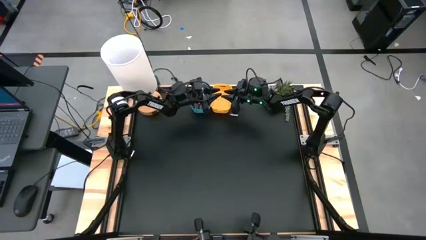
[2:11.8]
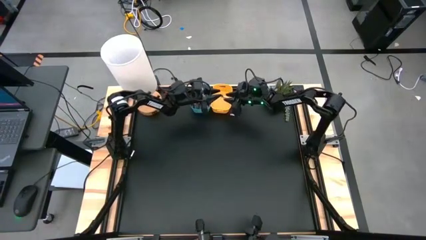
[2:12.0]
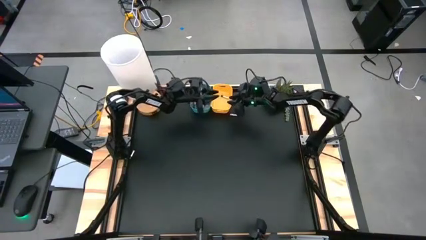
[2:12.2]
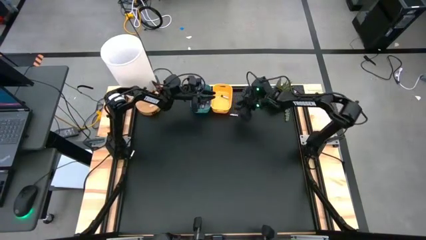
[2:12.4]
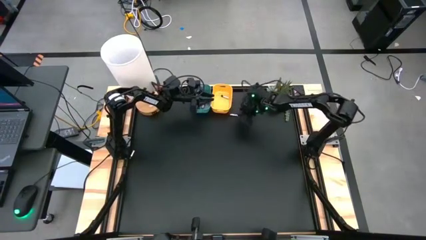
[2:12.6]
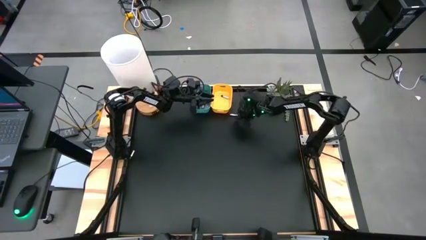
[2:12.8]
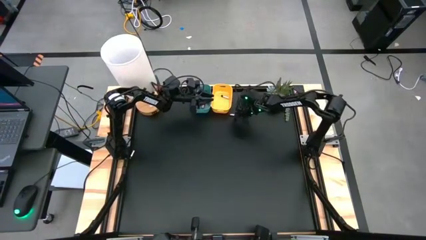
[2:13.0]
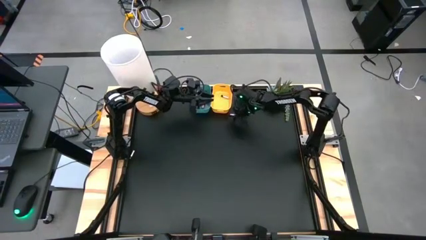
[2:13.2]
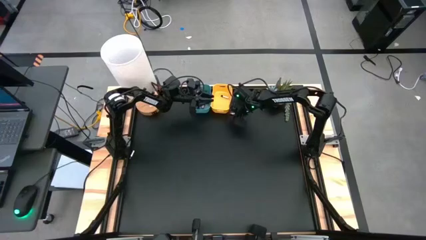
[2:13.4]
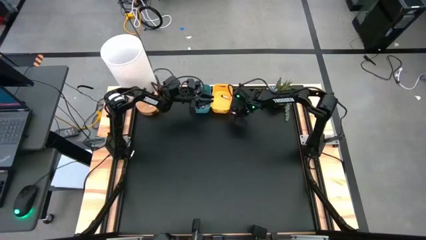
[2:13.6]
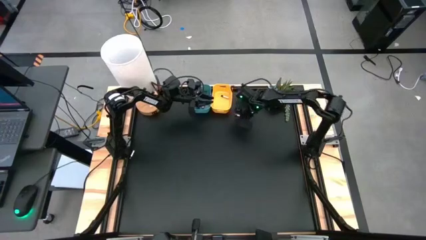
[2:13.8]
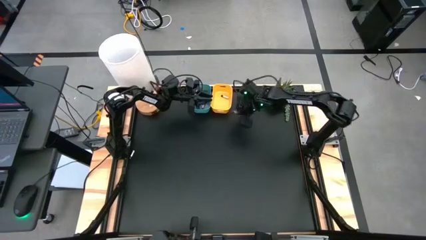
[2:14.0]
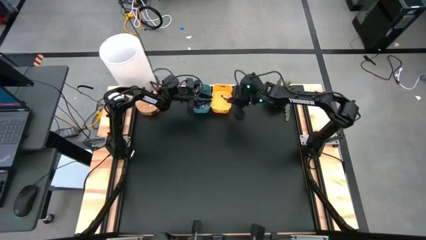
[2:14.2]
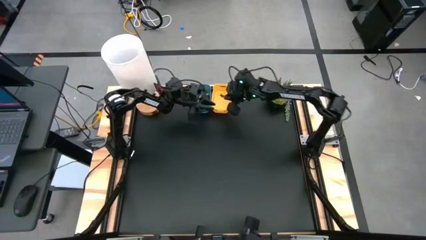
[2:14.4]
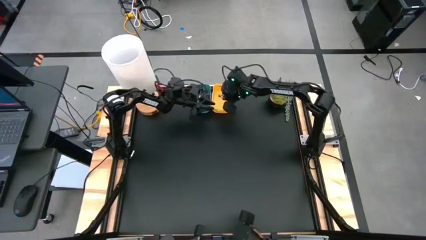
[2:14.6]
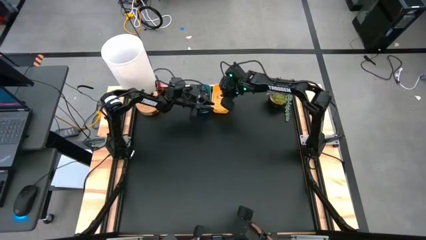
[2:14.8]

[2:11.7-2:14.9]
Task: Sort batteries
Put the silver black battery into the yellow bin

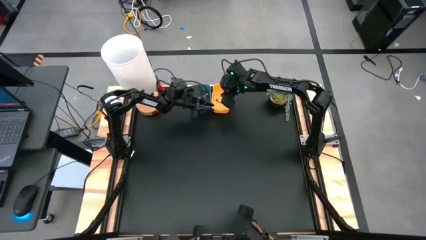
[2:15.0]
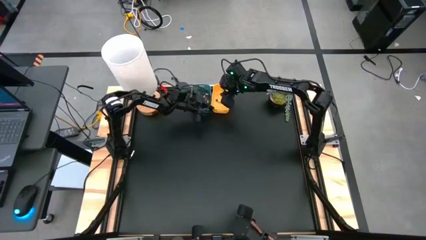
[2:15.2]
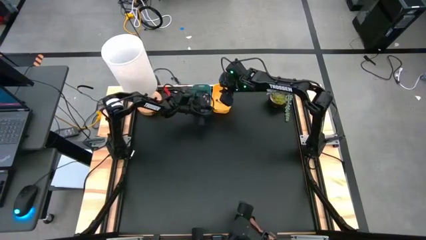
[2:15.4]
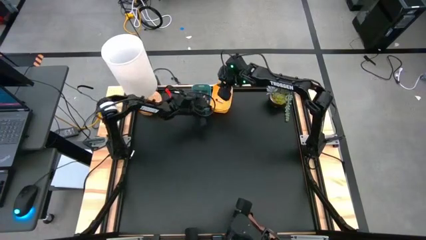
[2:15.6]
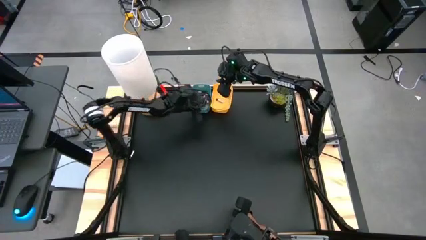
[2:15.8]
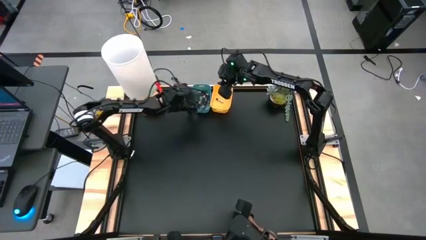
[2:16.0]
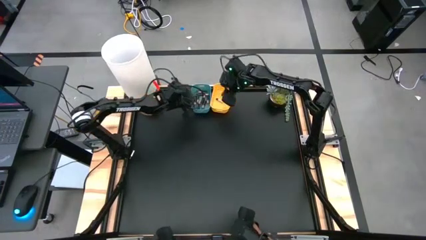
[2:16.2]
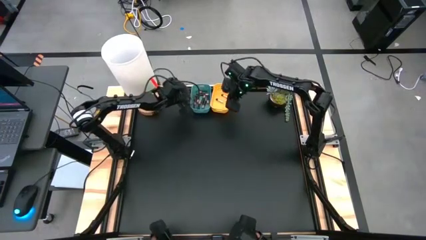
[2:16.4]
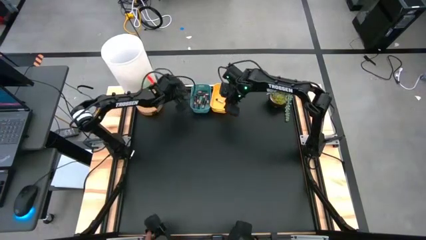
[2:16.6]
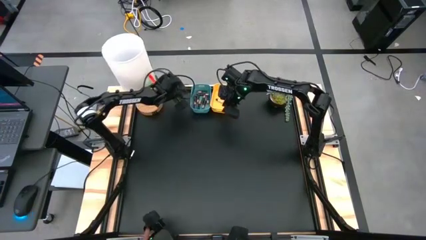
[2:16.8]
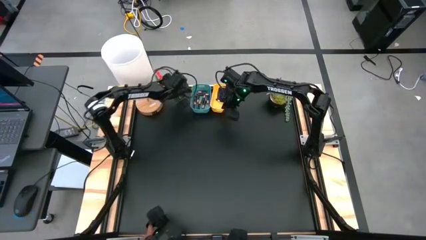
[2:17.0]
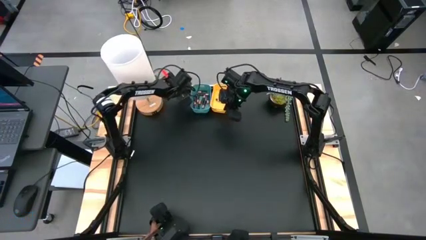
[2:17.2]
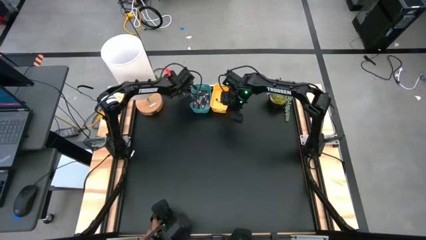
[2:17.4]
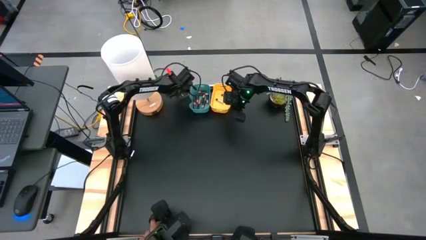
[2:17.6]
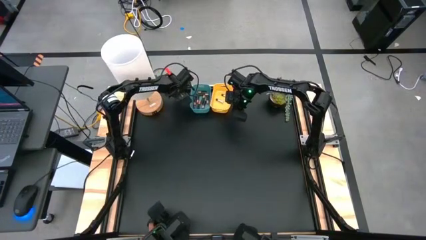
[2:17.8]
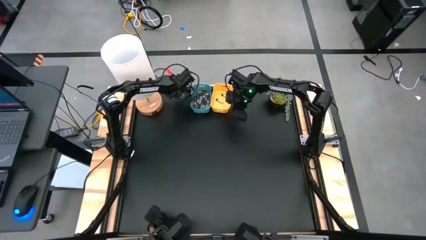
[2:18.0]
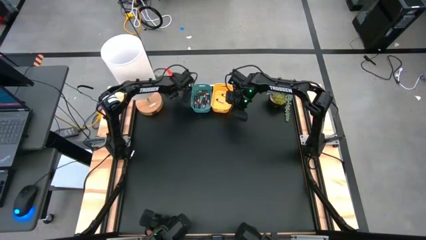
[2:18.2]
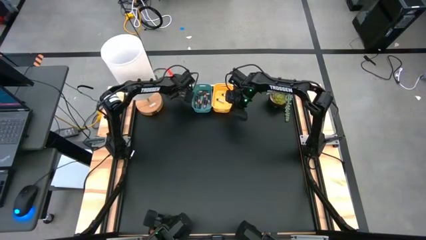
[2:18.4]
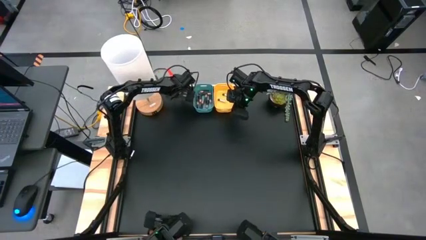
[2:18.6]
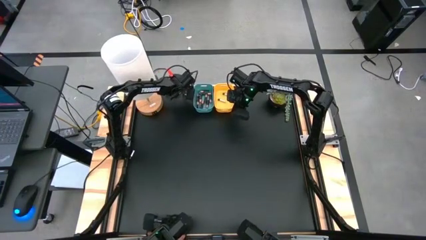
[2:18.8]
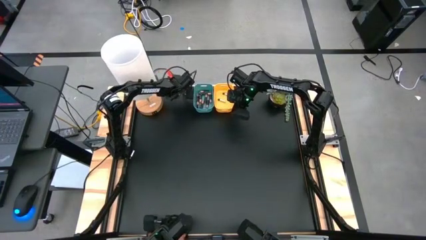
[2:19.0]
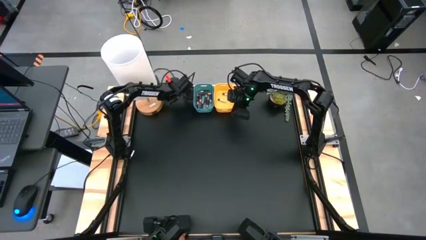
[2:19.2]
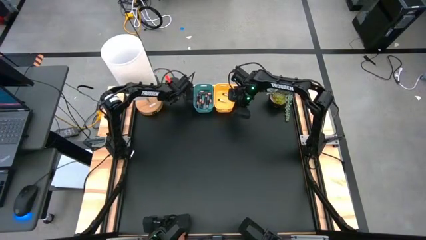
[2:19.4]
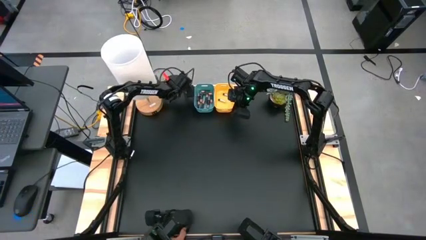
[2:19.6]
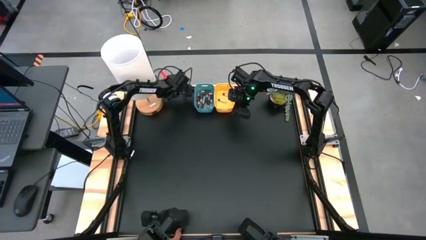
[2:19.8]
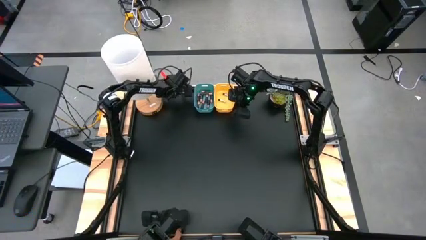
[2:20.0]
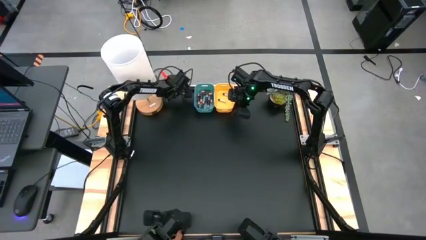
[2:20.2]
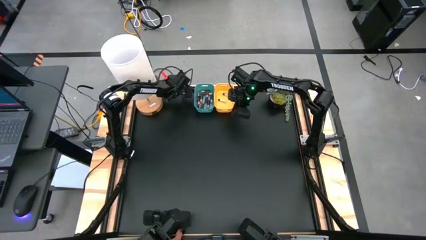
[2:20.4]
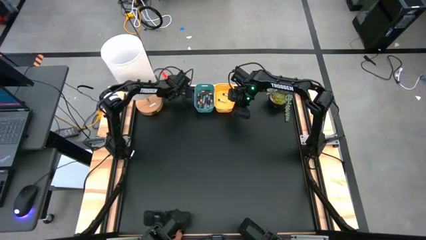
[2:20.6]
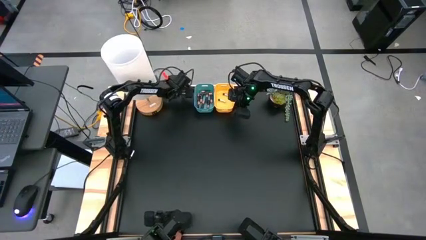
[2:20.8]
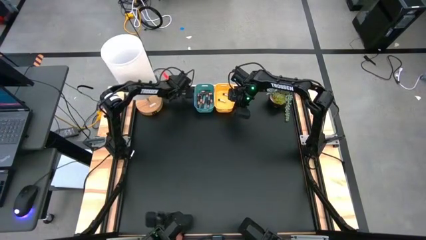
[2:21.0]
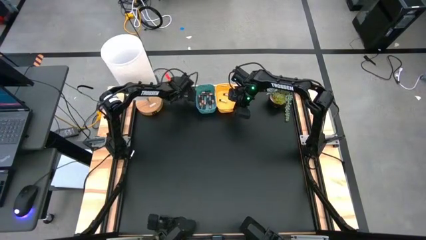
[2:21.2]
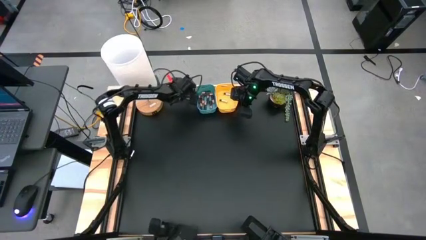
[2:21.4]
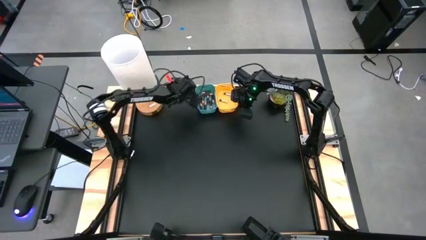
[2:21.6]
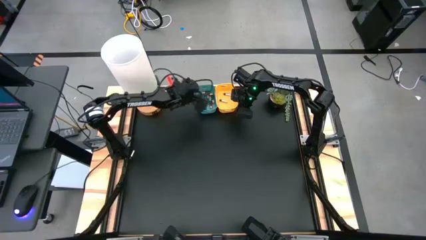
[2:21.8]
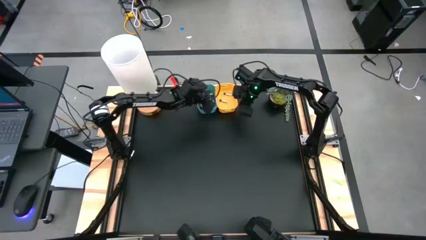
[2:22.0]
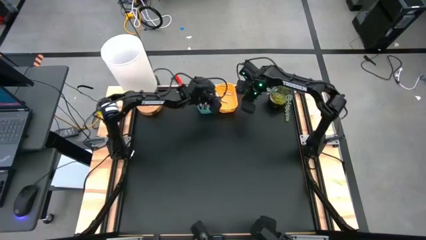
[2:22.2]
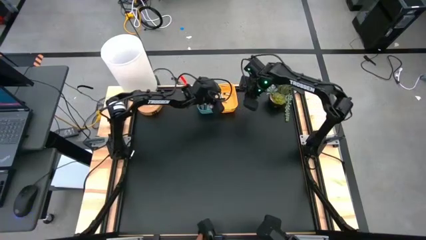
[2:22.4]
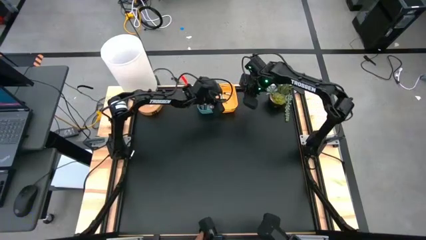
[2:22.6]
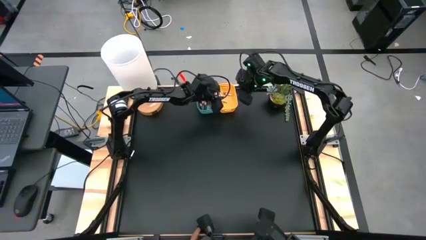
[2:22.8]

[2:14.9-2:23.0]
Put the silver black battery into the yellow bin
